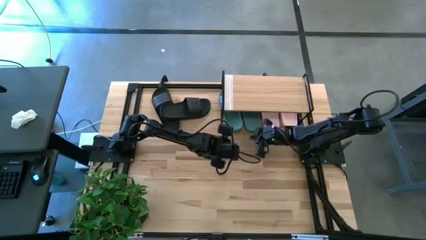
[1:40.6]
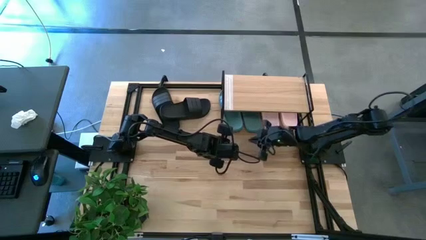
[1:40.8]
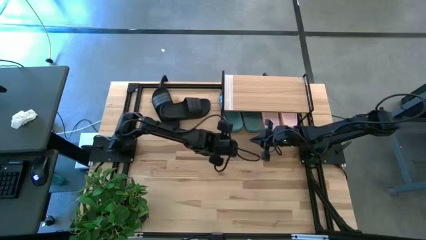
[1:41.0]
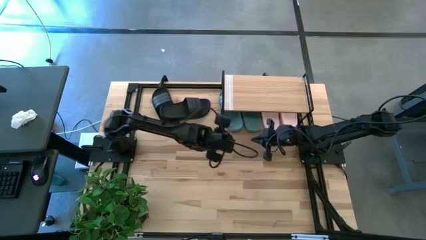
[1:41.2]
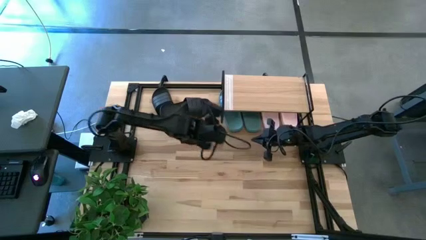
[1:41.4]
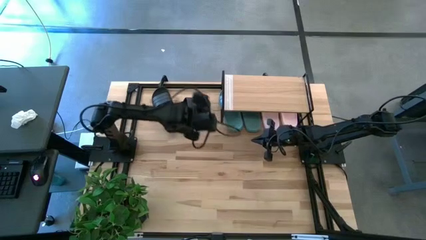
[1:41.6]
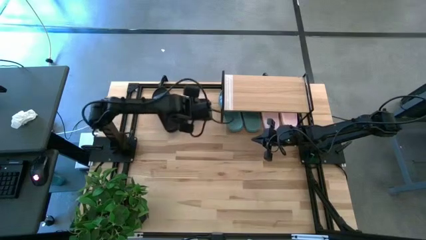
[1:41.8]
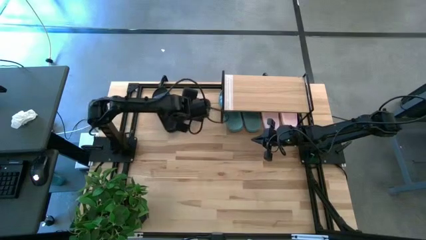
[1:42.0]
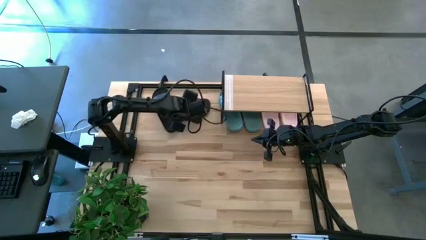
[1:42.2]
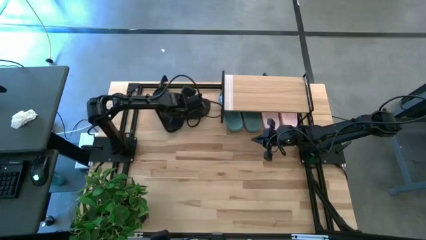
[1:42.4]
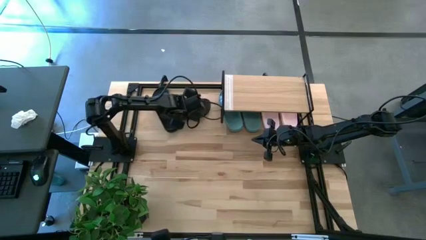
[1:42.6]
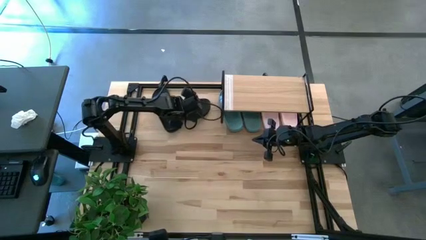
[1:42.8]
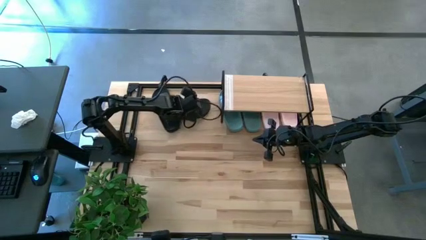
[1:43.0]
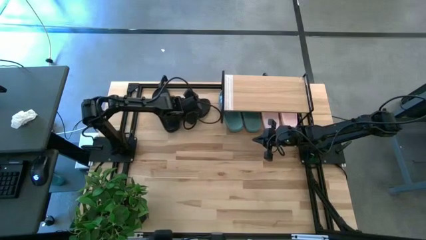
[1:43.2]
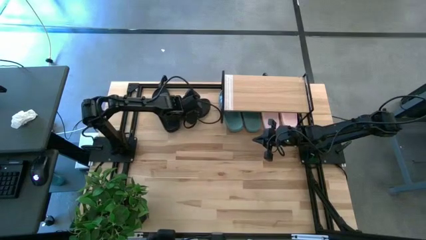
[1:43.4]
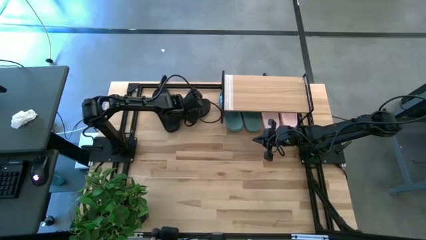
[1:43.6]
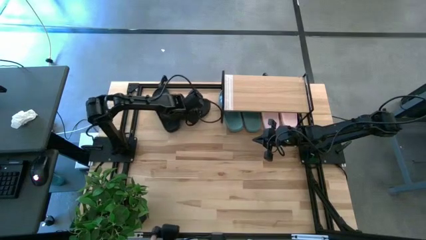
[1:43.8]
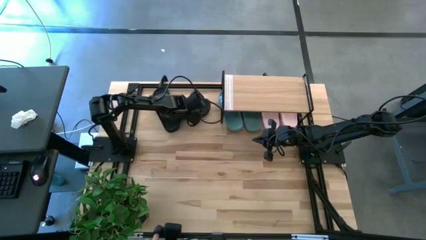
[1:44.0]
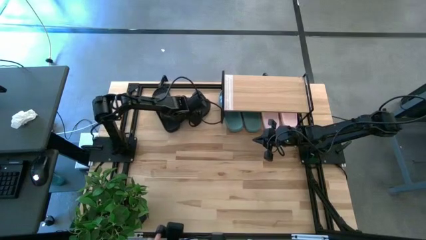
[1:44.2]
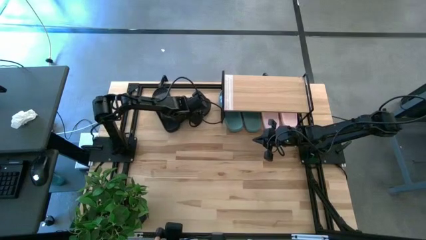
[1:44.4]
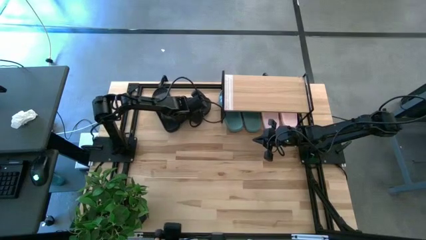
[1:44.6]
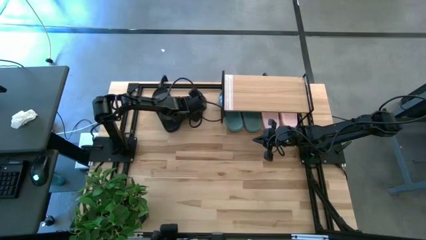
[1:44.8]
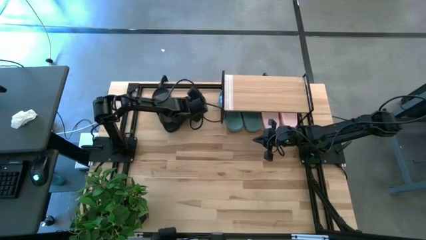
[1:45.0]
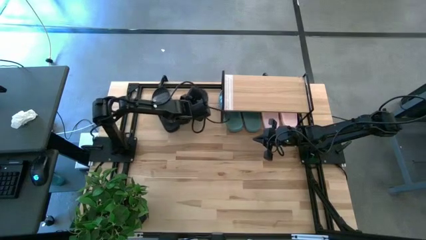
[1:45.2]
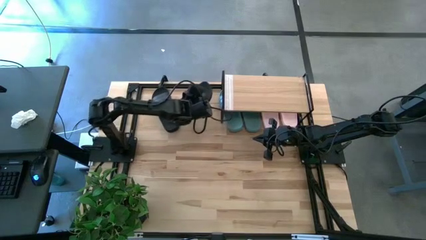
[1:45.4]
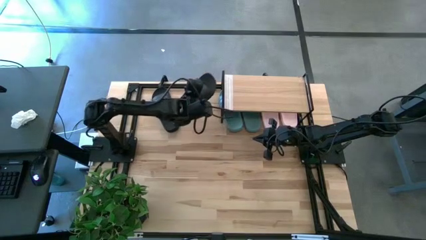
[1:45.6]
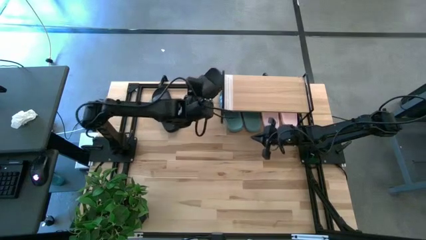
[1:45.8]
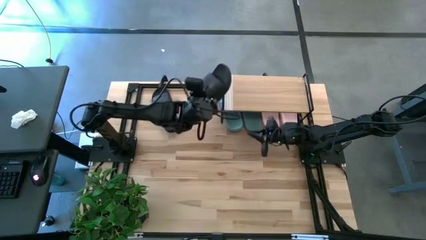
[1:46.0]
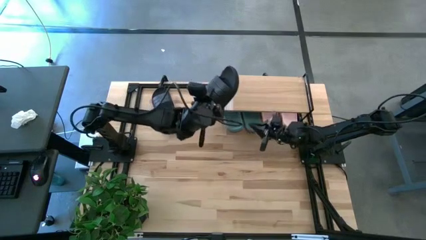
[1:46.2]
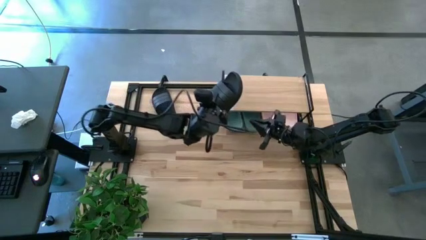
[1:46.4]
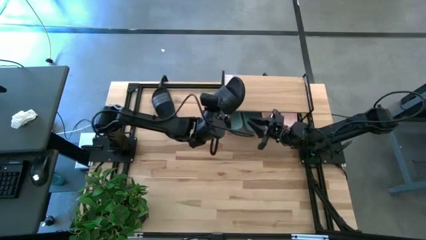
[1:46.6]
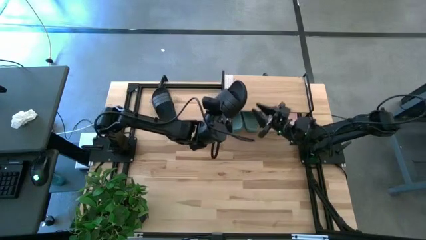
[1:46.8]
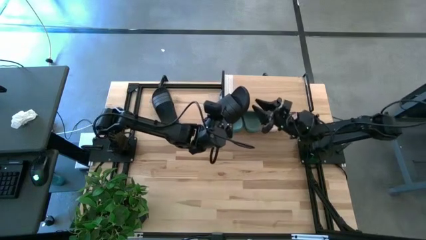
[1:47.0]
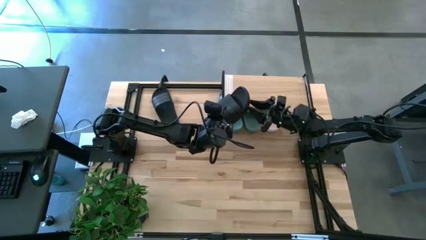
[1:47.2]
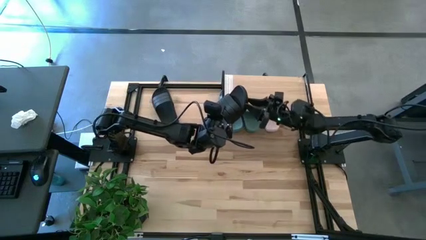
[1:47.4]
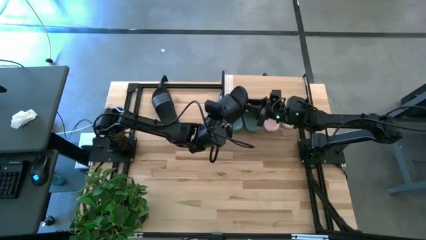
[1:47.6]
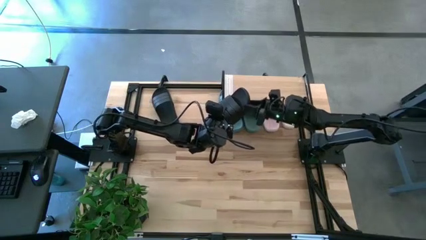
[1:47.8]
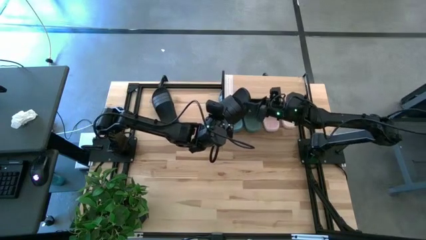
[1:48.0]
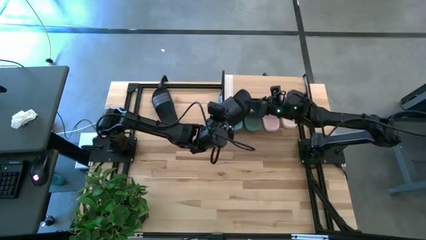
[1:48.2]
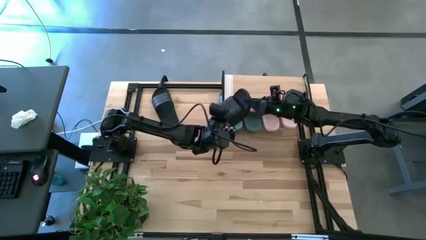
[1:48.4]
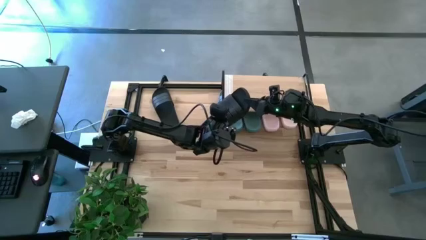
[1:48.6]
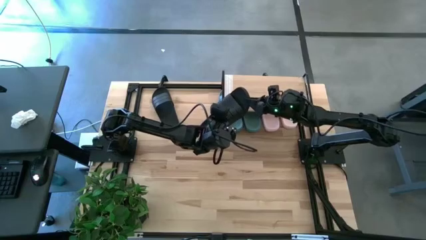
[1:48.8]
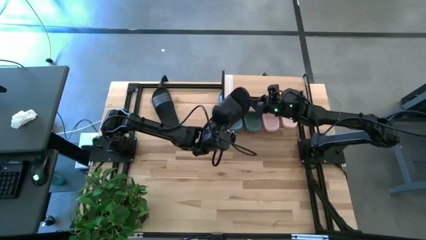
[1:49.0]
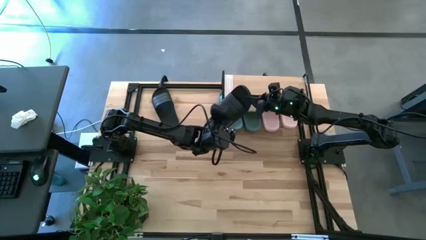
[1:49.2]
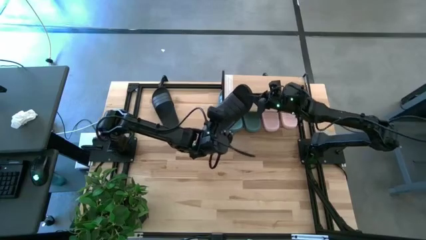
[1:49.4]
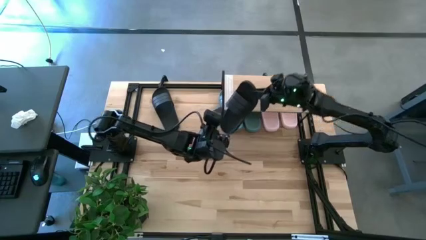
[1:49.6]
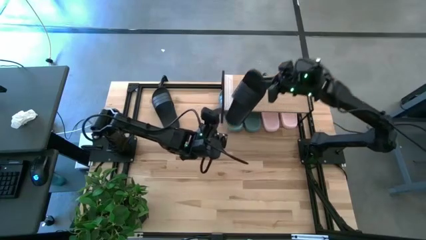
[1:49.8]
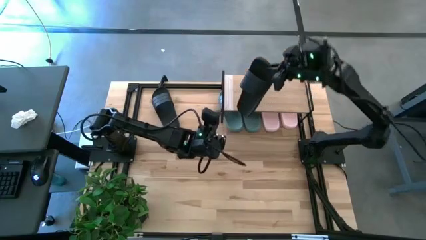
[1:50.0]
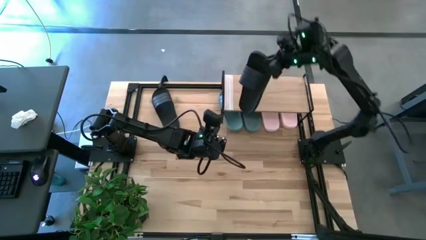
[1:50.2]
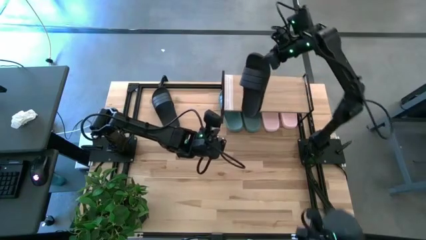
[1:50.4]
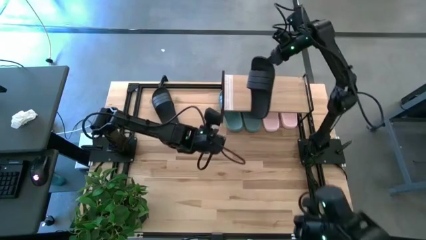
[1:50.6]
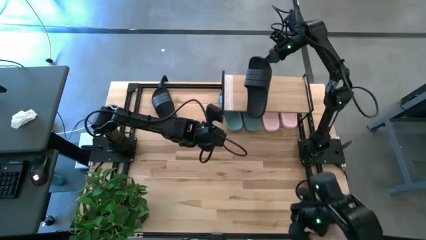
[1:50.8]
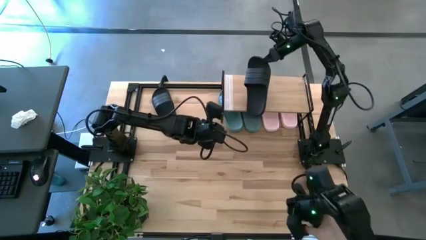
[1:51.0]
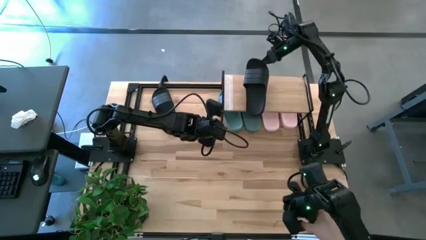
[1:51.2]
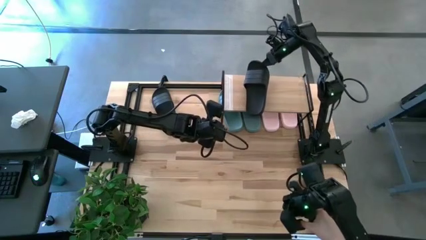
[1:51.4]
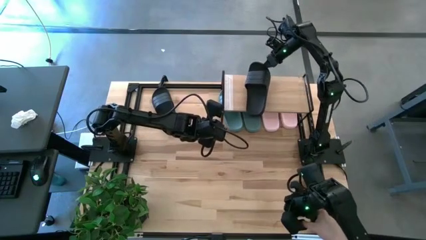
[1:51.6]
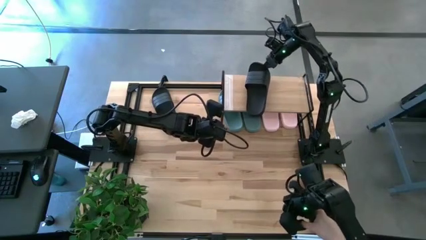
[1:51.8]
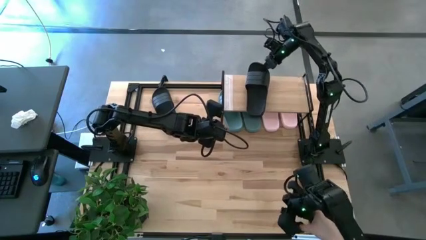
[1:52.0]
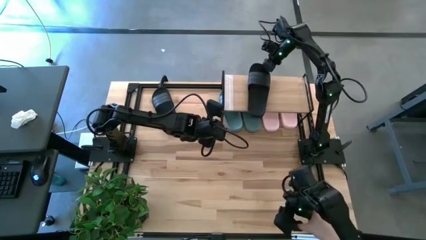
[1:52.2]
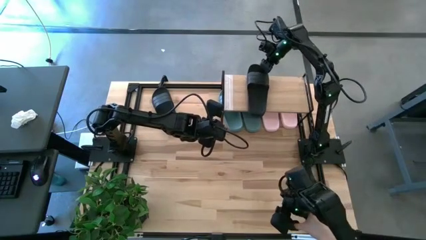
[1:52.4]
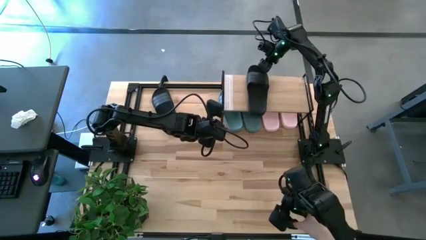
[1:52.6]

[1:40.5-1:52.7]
Task: Pick and place slides into the shelf
Put the right black slides on the shelf
